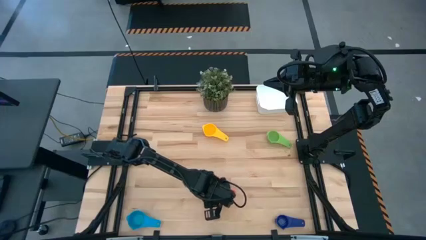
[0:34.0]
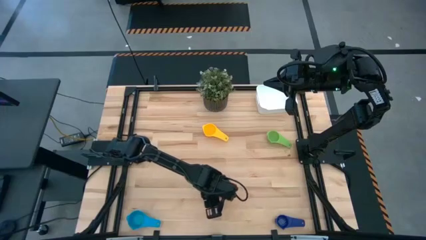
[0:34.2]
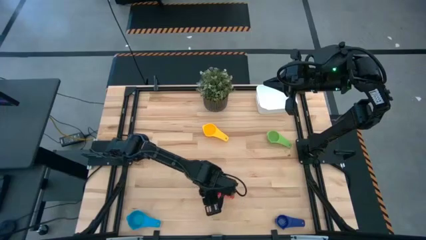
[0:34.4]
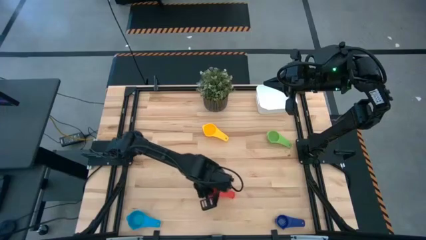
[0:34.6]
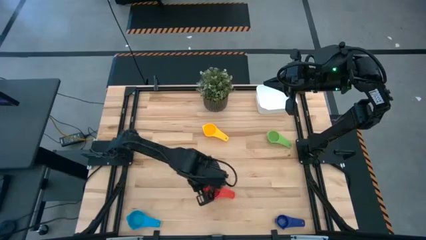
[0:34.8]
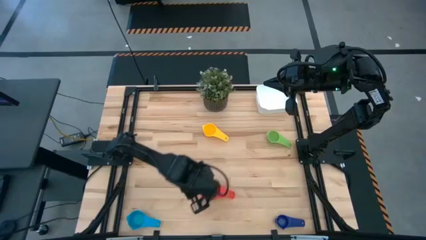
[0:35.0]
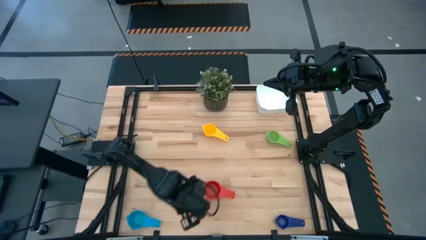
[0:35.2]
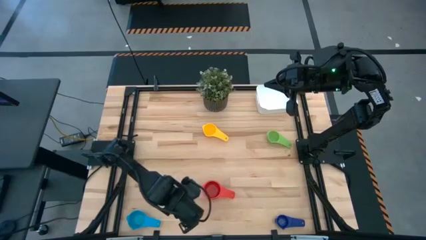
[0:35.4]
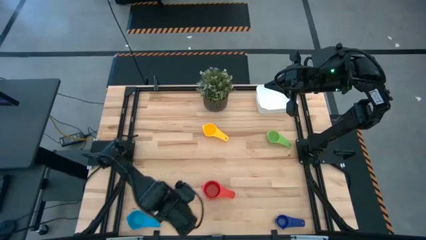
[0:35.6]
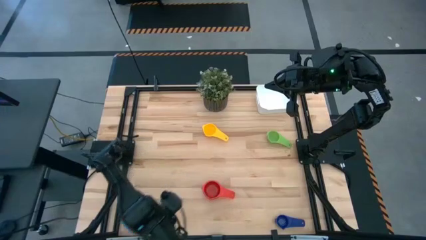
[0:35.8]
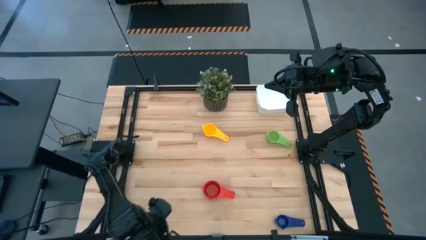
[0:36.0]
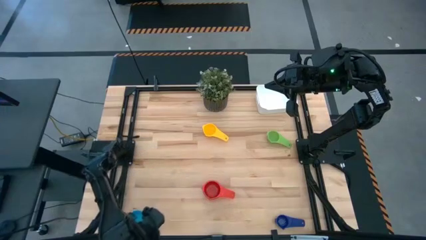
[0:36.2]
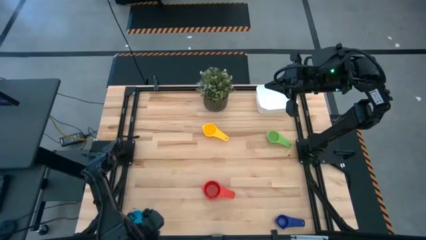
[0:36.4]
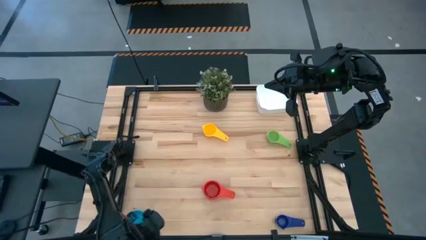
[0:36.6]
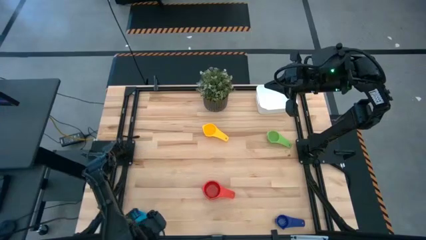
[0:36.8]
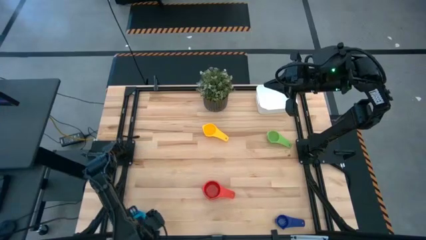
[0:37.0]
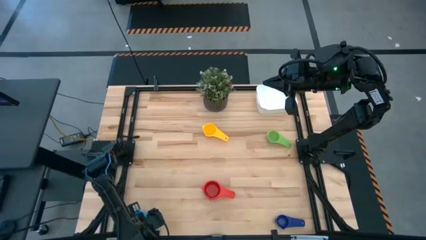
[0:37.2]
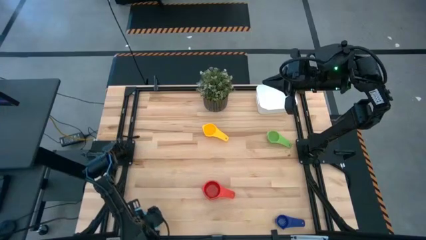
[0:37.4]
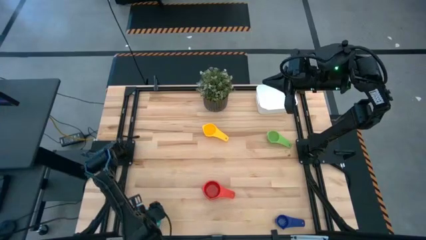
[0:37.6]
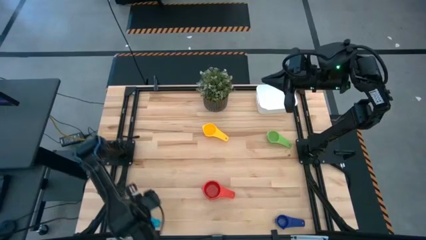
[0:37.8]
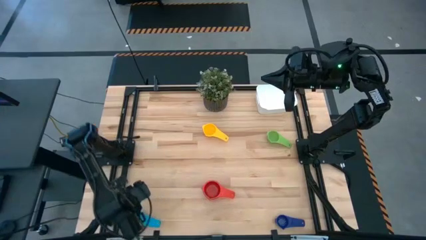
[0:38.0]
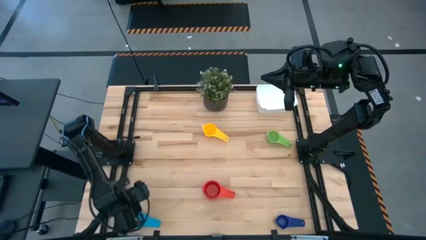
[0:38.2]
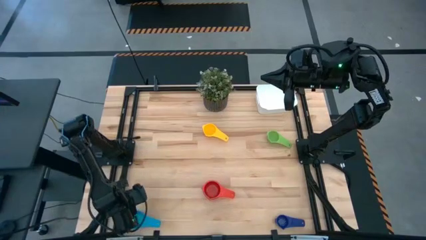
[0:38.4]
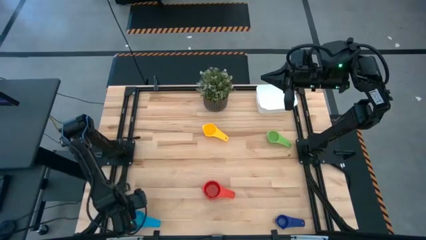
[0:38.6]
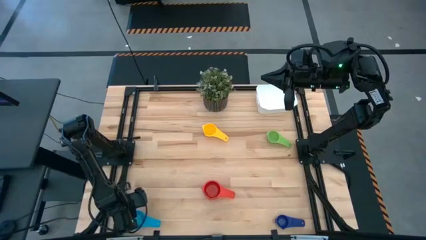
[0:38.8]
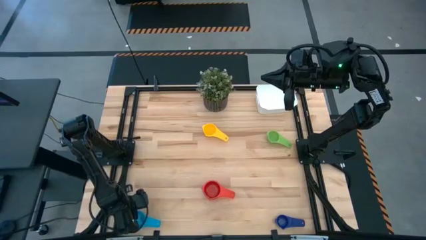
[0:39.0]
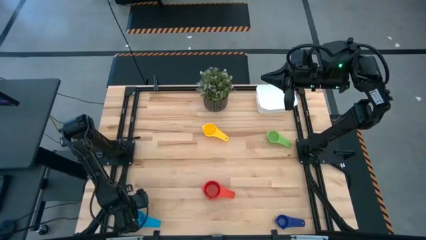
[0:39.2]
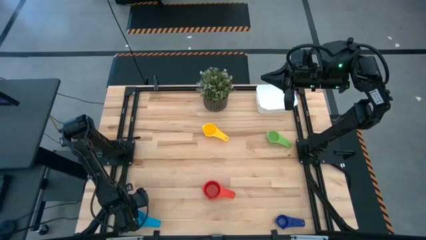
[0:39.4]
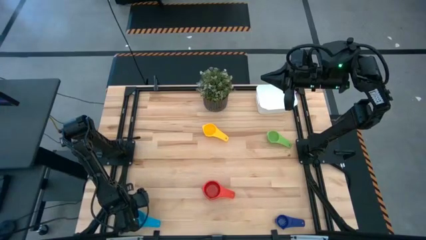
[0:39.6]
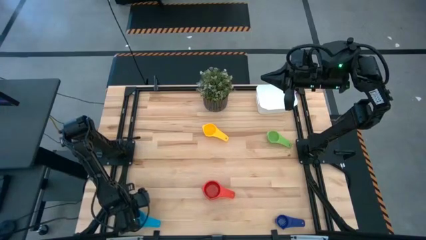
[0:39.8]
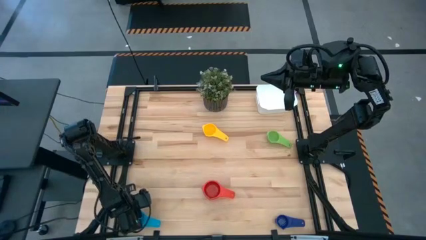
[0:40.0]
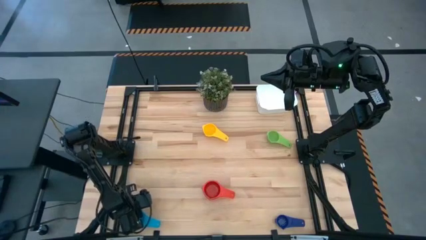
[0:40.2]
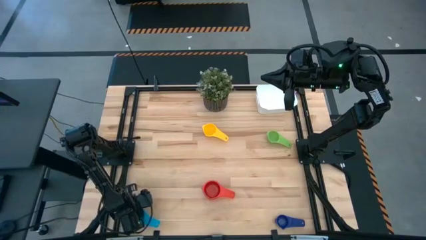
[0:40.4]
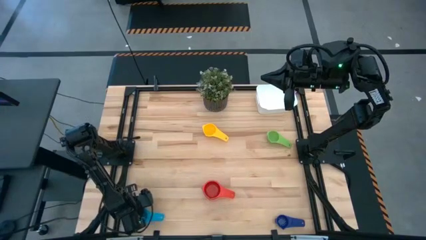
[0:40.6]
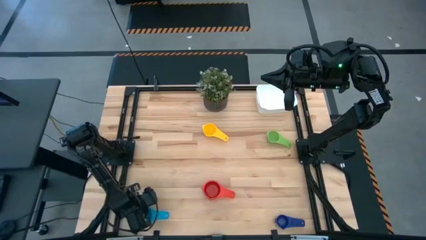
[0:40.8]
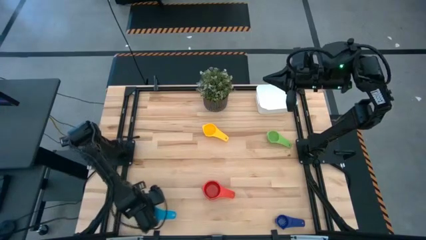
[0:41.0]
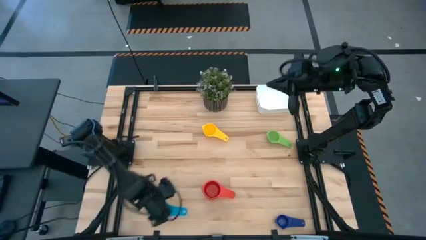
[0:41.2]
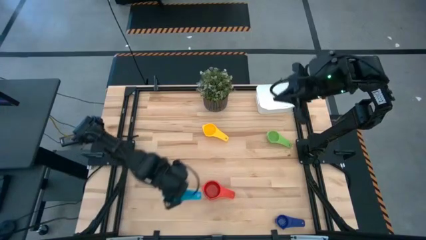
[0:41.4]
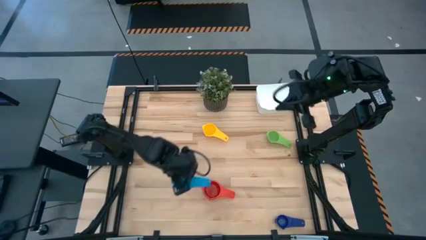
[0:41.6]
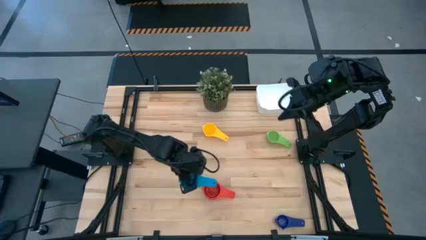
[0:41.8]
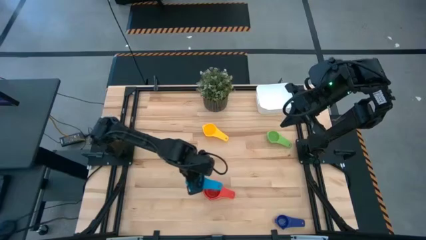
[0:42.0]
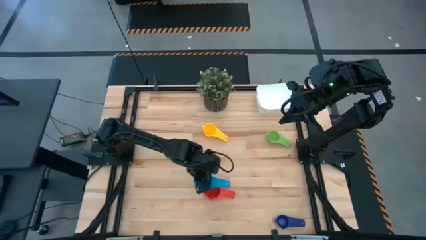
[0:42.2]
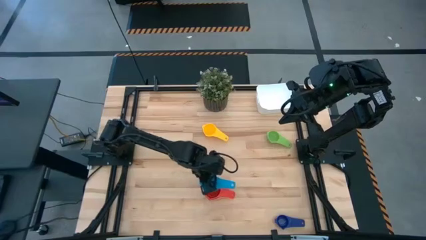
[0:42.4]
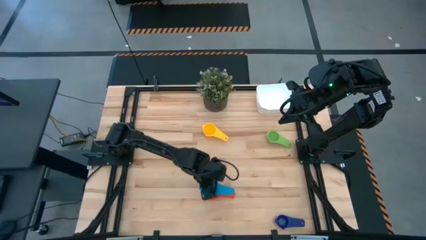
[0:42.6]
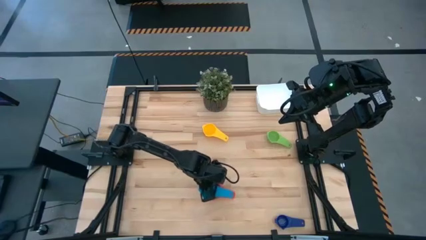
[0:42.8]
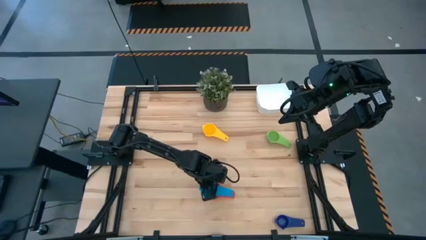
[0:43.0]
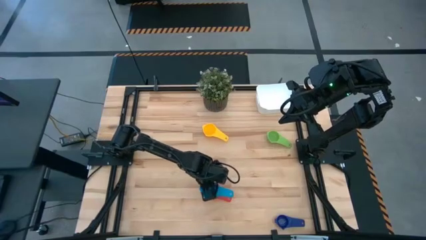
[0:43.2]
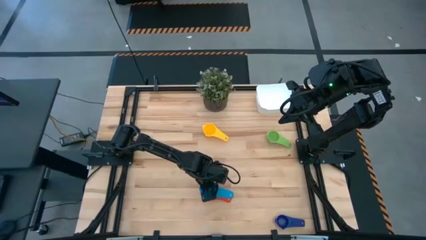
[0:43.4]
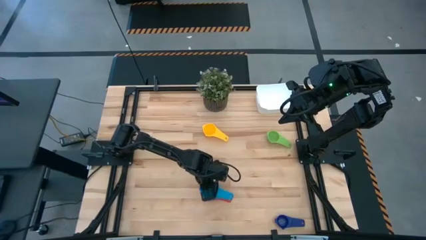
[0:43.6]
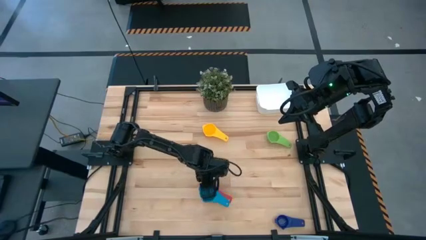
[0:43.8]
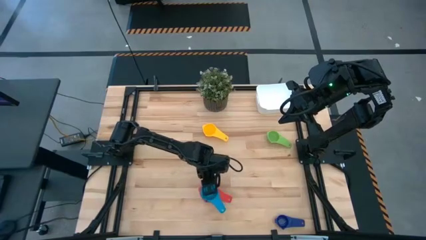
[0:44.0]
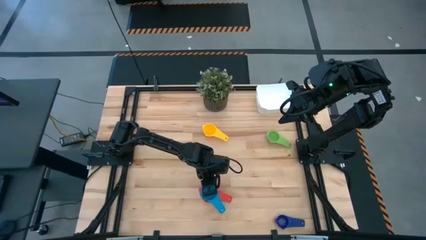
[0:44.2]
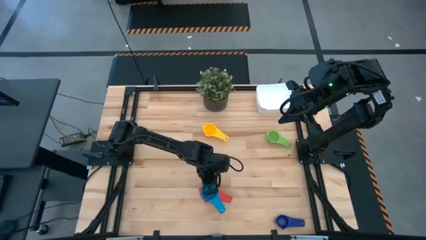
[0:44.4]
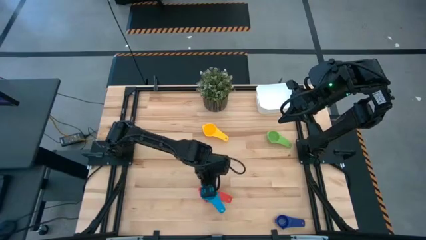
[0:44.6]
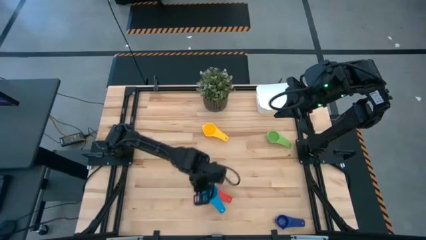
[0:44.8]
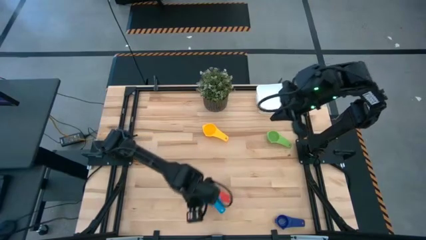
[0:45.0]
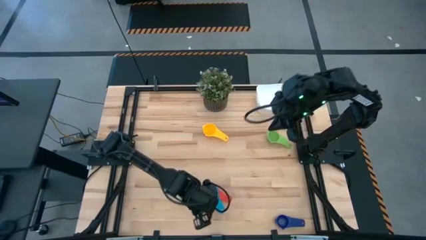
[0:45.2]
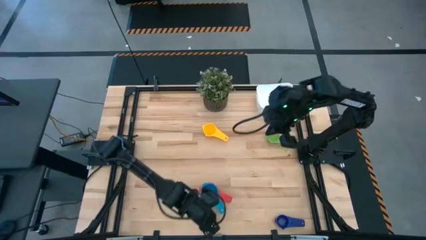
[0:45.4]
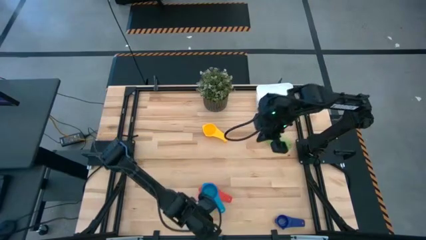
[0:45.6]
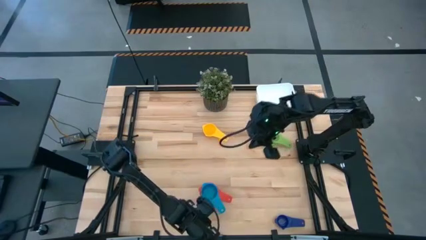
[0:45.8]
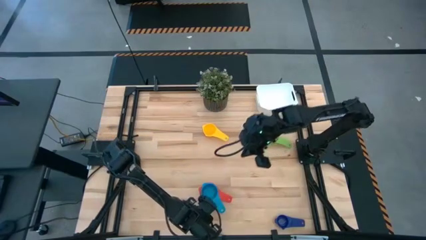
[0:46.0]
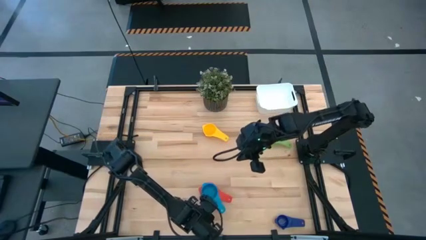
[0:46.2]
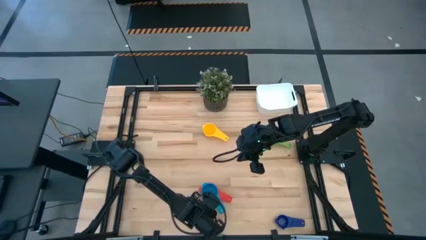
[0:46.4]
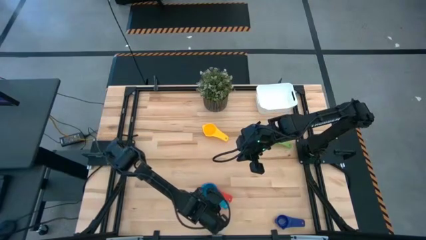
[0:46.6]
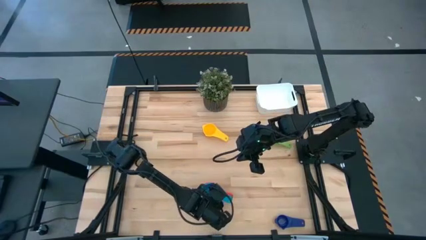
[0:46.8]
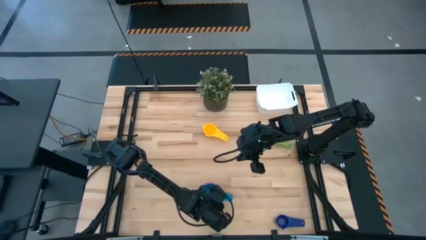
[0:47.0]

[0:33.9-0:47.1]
Task: Nest measuring cups in basket
Stack the light blue measuring cup on top of the red measuring cup
